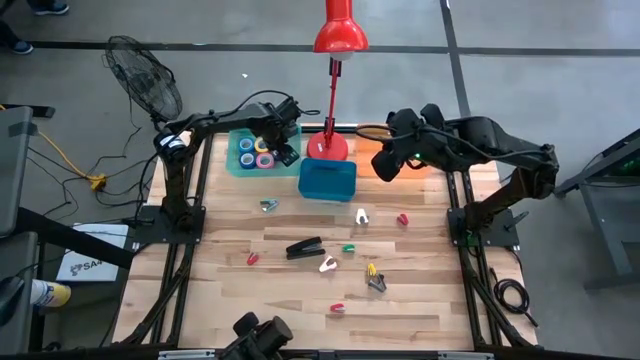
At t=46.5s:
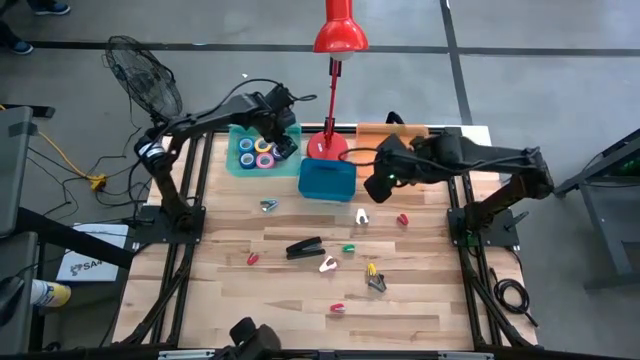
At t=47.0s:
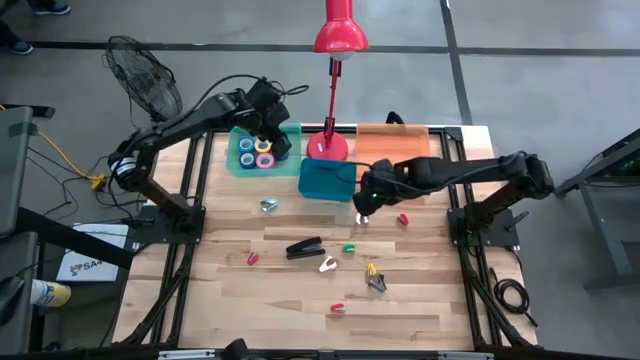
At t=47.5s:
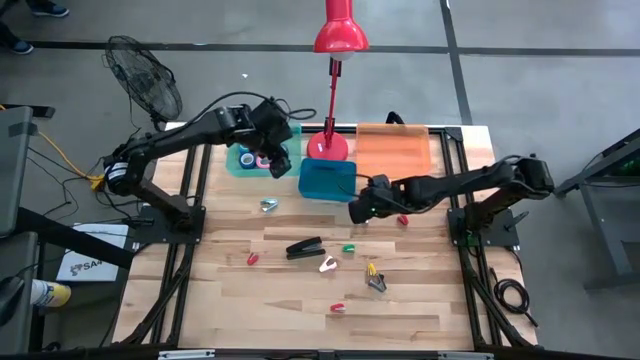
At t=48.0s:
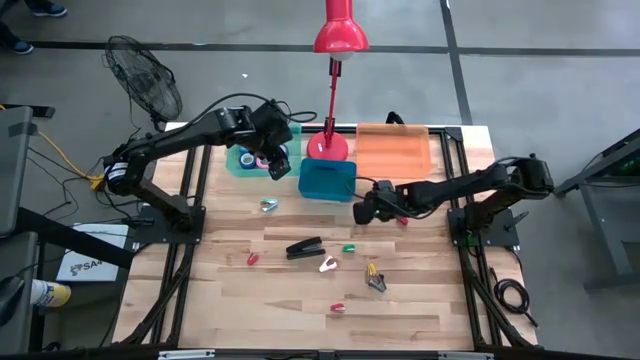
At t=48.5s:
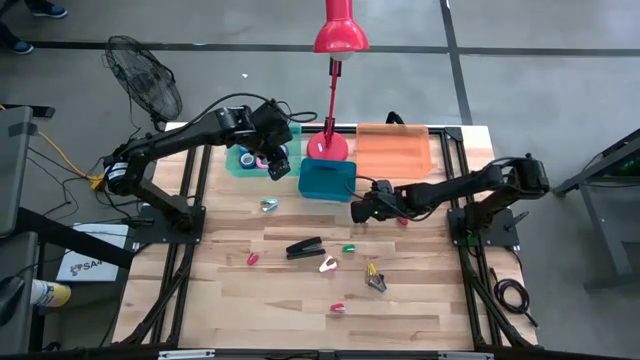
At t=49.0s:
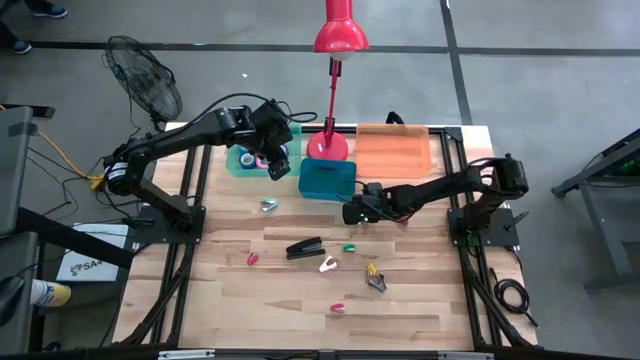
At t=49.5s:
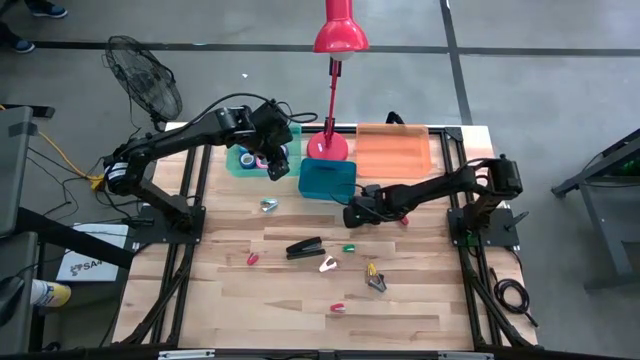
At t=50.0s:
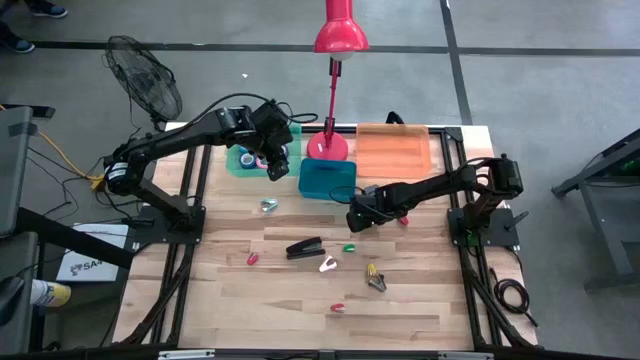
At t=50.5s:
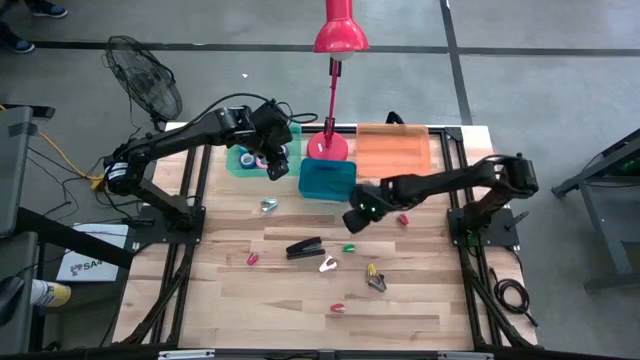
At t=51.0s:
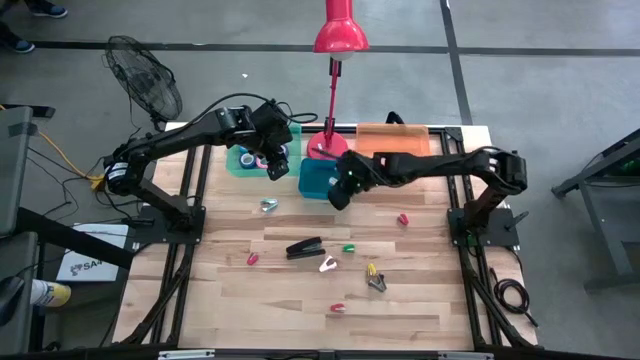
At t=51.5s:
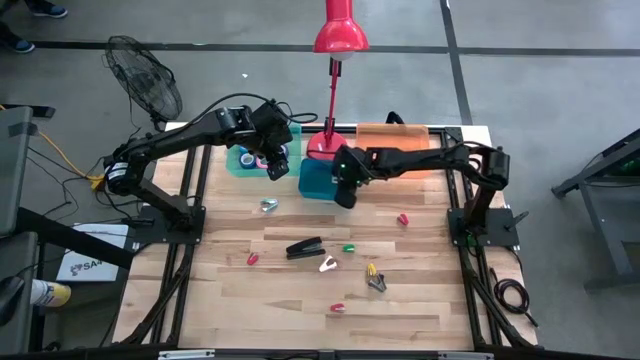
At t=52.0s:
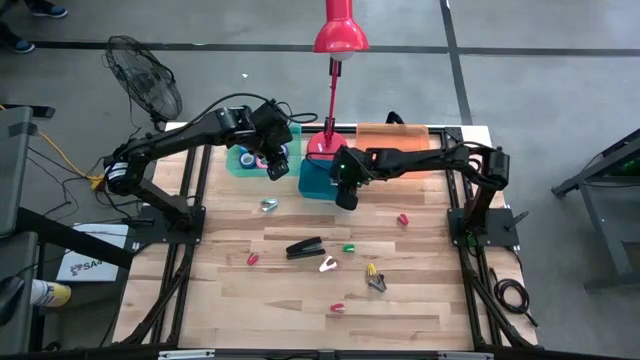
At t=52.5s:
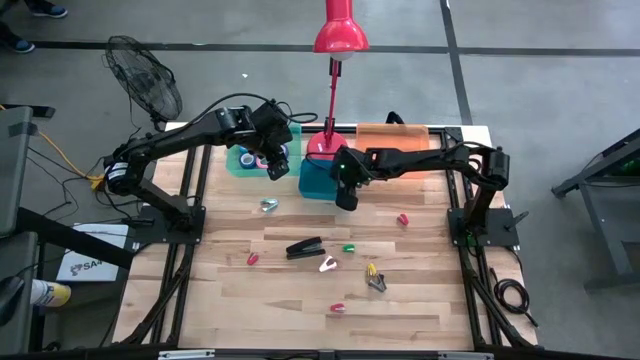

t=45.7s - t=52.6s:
Task: Pick and place Stapler, Stapler remover, tape
Put the gray staple remover into the blue bin

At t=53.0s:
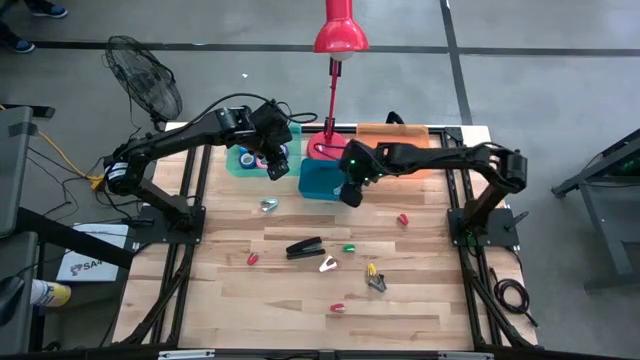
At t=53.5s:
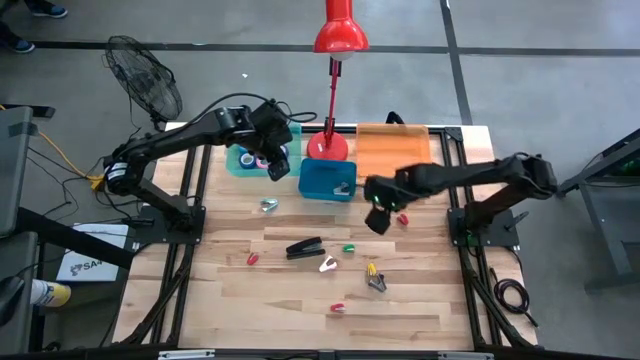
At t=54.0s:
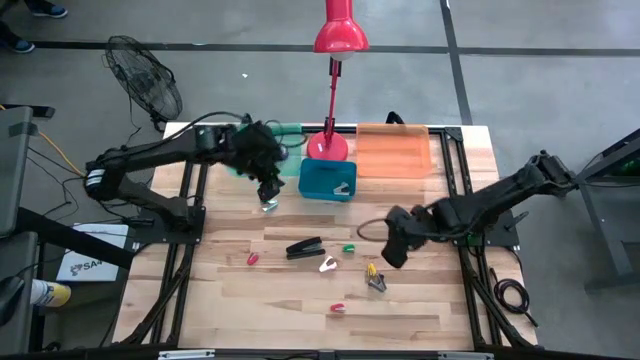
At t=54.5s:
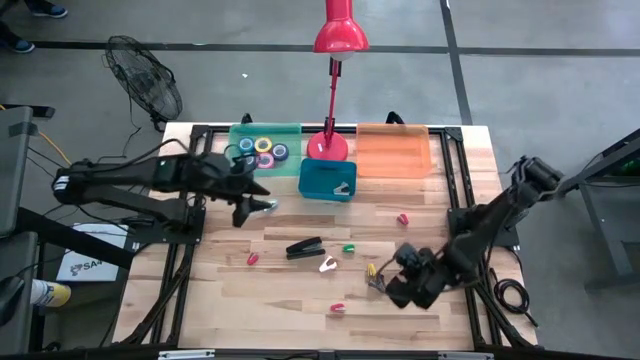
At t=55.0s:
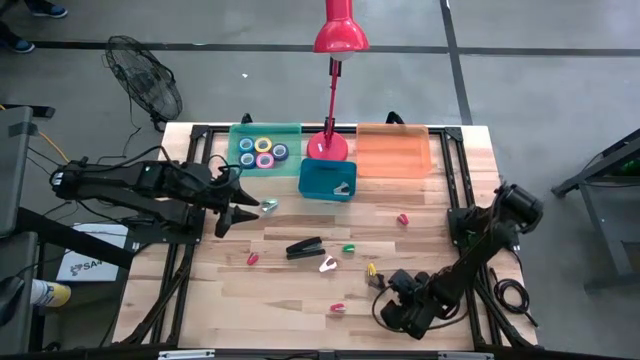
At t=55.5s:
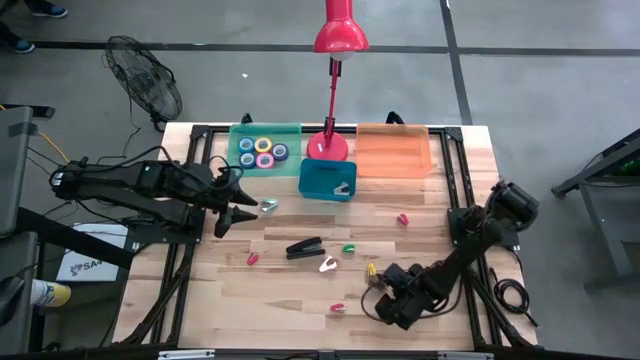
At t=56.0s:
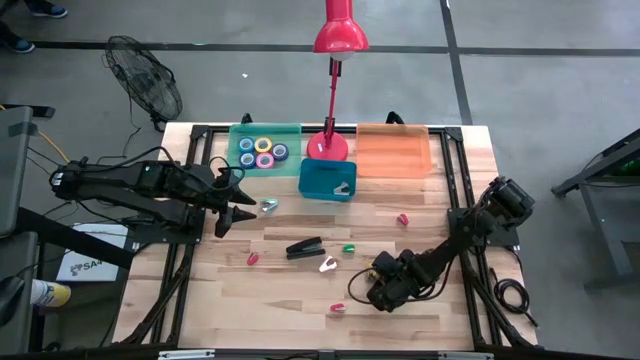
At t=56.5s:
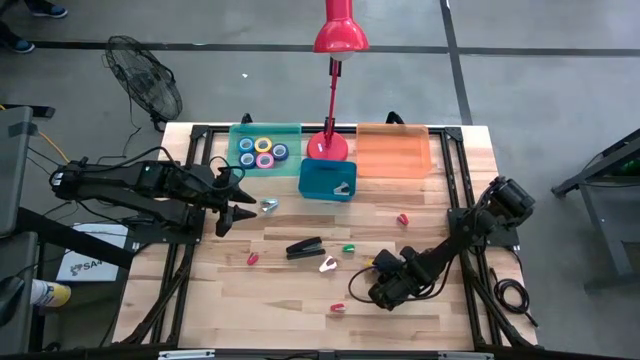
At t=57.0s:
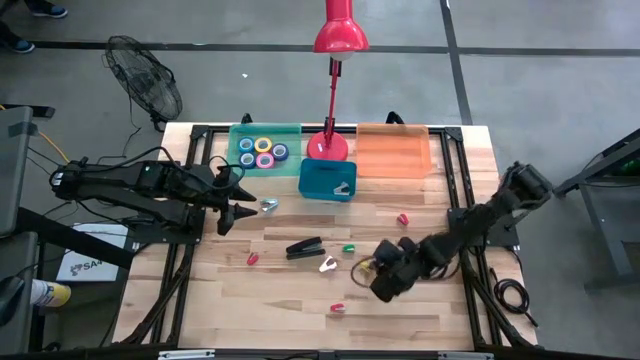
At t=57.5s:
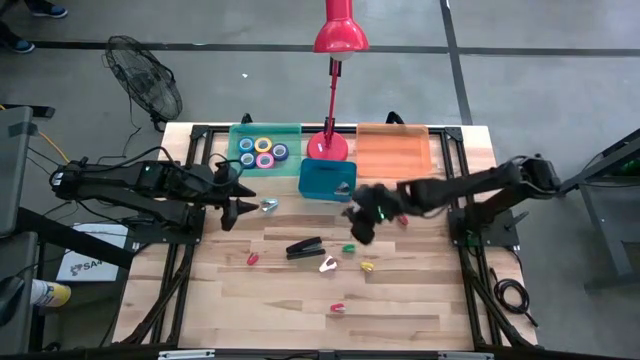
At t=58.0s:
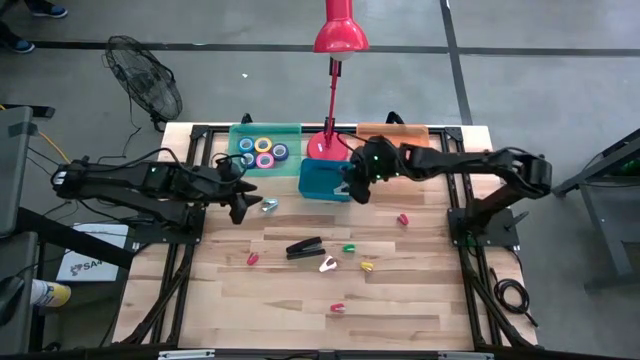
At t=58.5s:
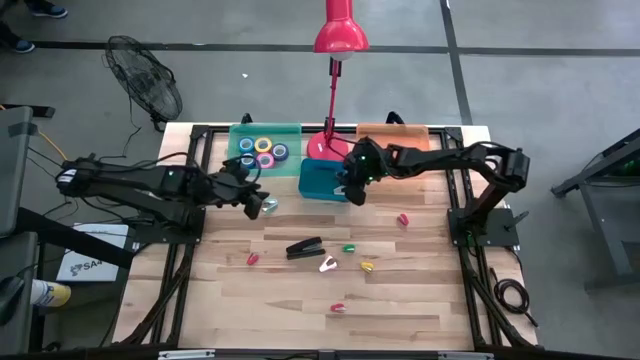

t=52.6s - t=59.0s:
Put the black staple remover into the blue bin

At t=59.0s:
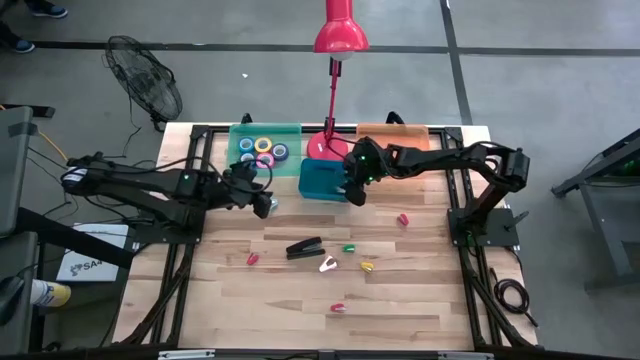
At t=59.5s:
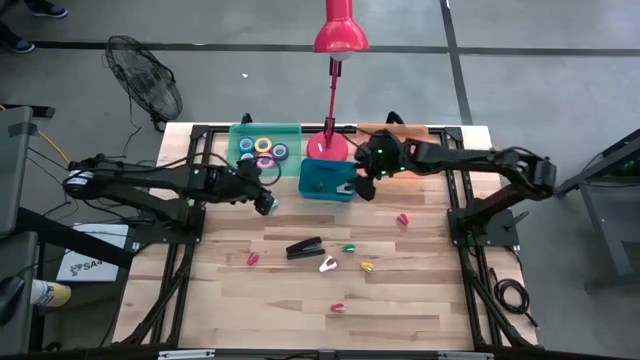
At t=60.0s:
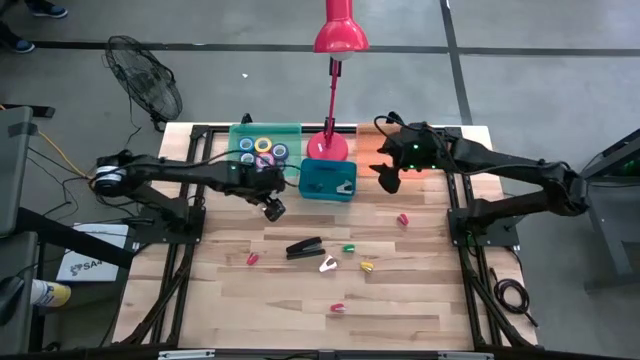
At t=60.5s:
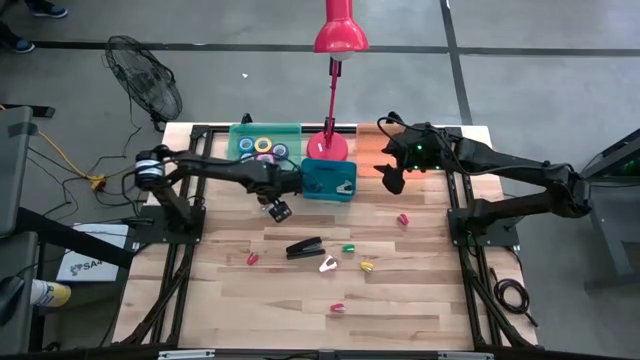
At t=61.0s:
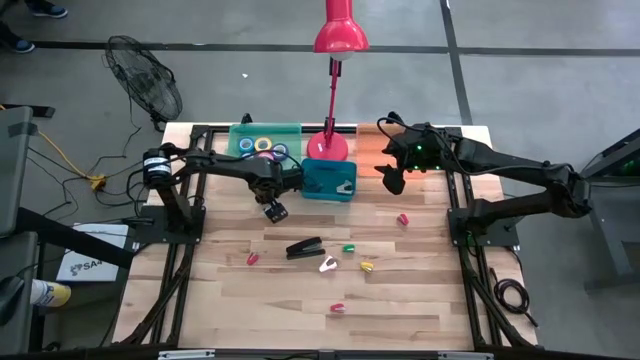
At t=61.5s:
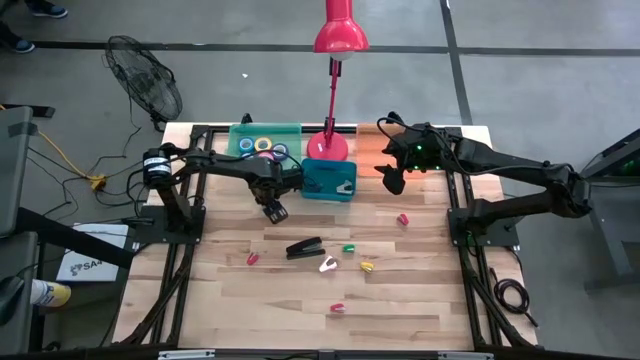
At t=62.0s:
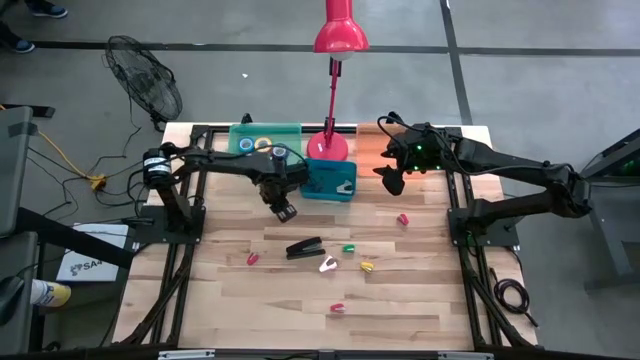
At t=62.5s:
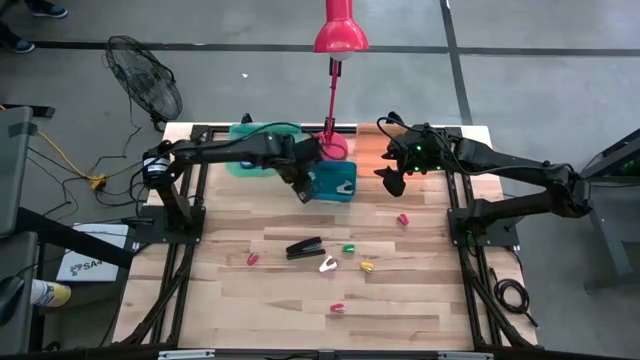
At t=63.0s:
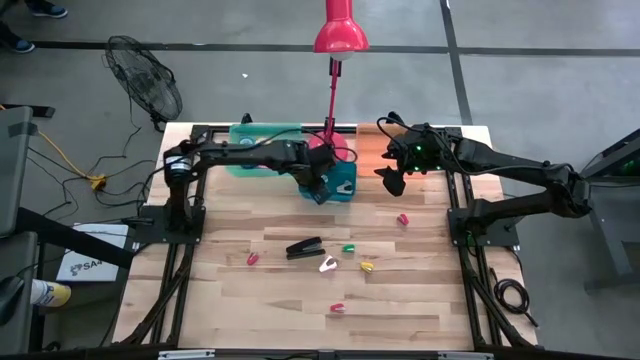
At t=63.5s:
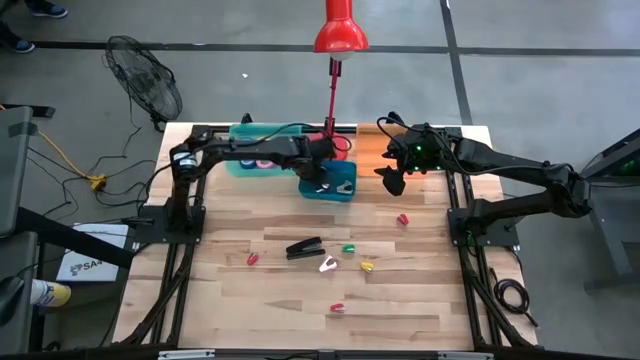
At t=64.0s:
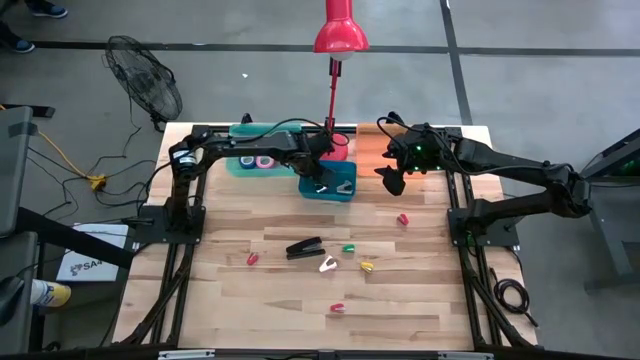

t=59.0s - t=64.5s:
Put the light blue staple remover into the blue bin

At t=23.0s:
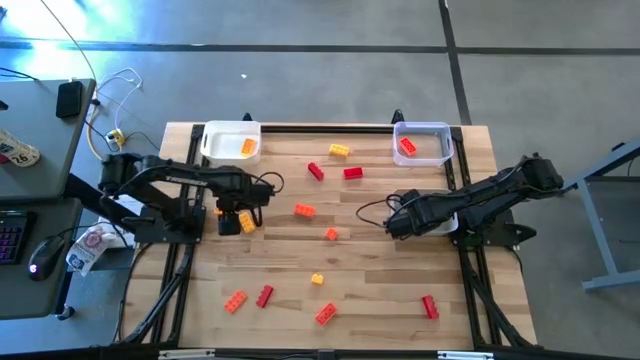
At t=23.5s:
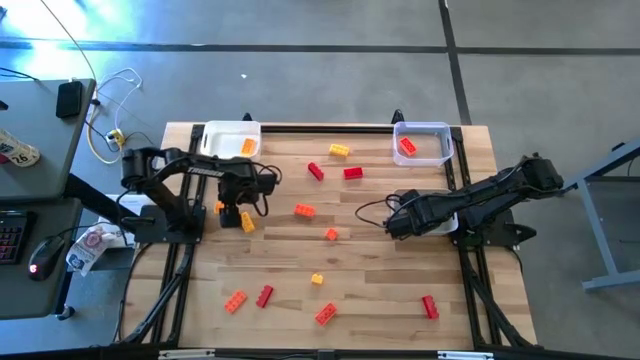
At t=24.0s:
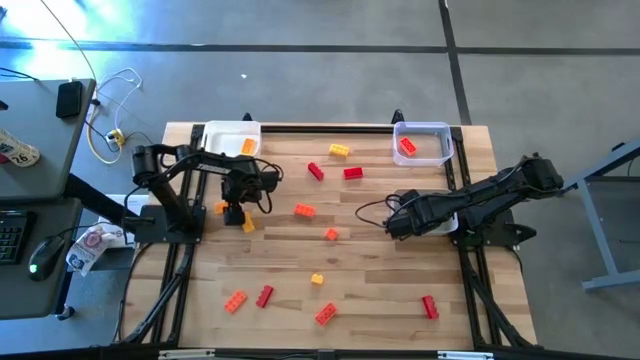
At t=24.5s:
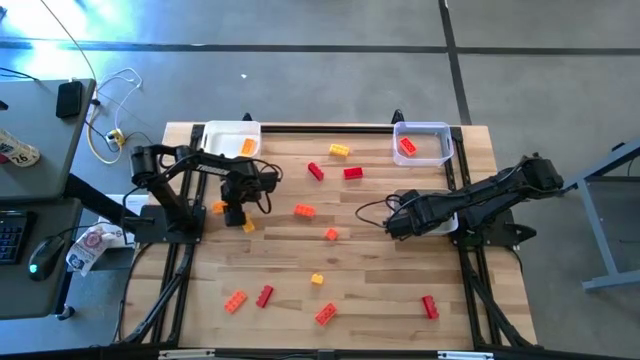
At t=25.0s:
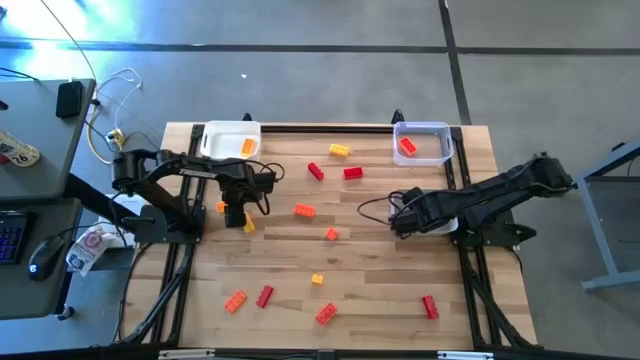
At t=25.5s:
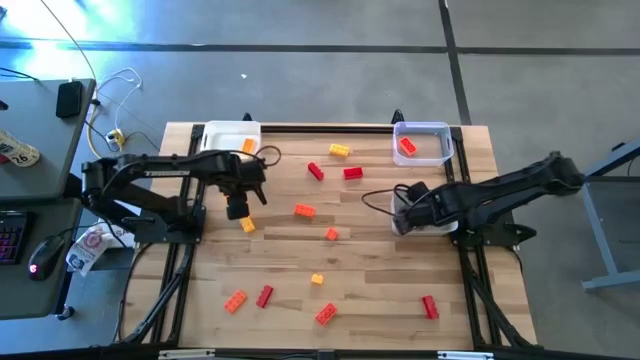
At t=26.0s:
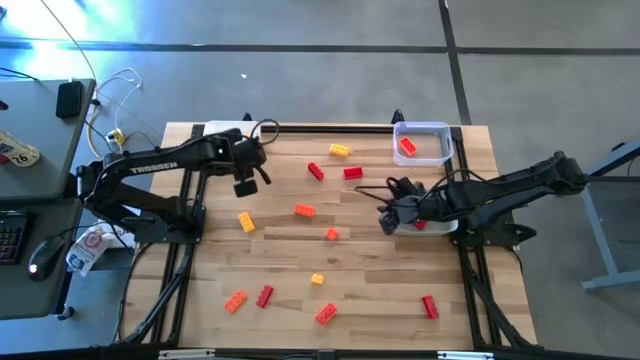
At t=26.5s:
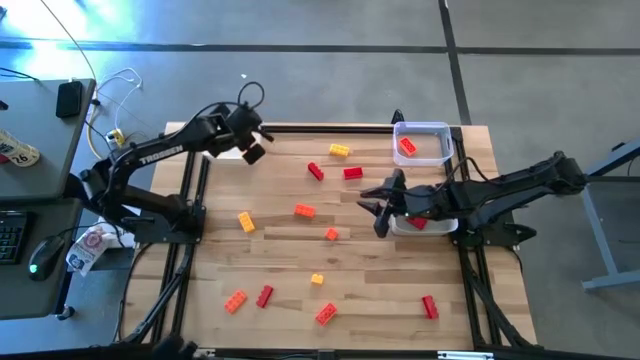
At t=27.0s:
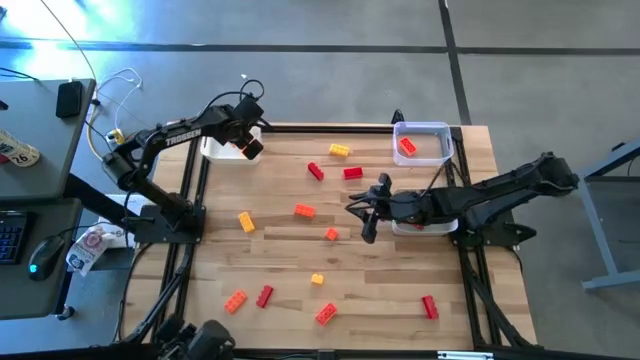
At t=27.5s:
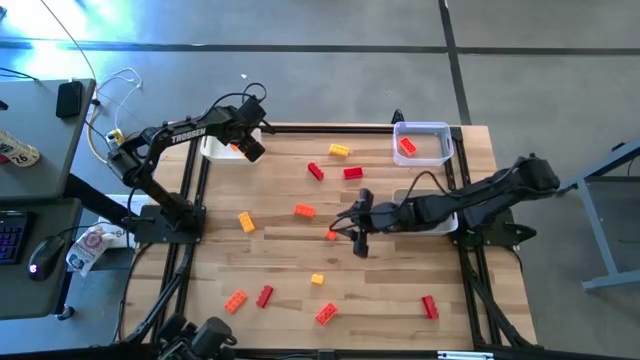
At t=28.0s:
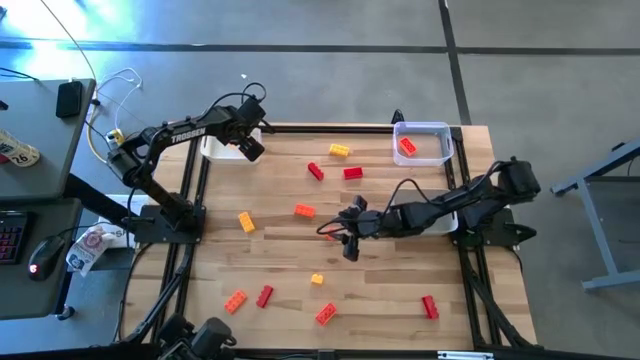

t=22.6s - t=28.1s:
Task: Sort & place blocks by color
Put the yellow game piece into the white bin
